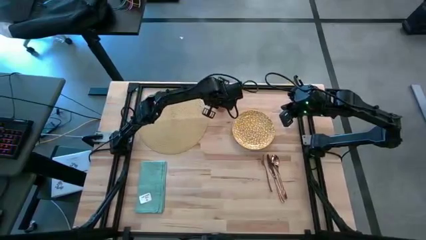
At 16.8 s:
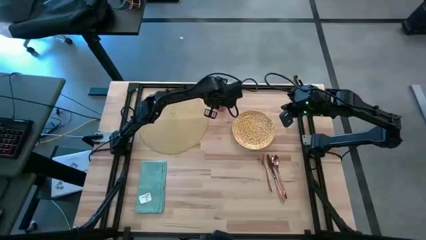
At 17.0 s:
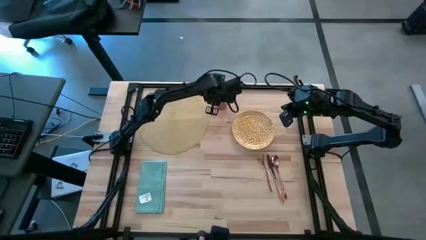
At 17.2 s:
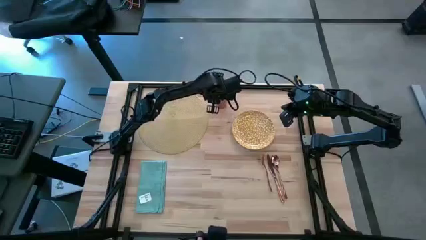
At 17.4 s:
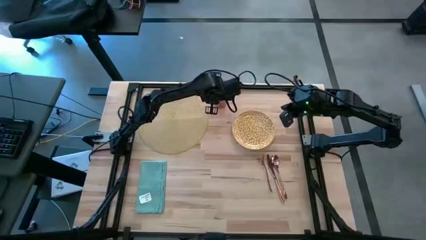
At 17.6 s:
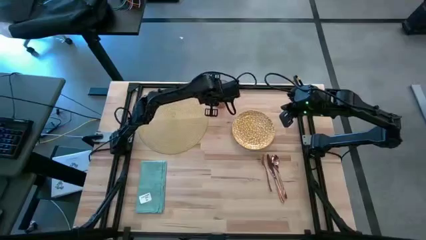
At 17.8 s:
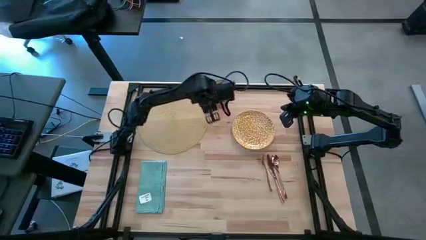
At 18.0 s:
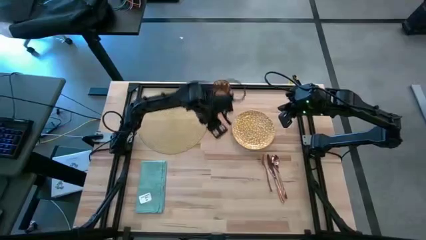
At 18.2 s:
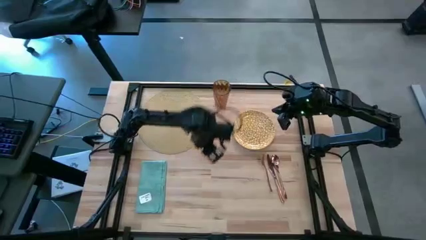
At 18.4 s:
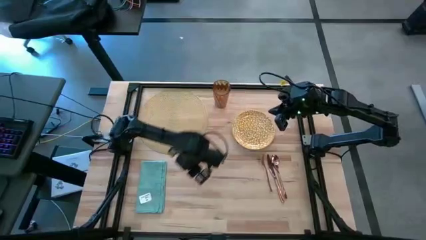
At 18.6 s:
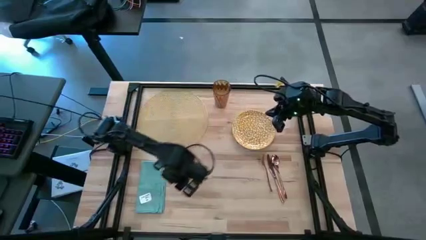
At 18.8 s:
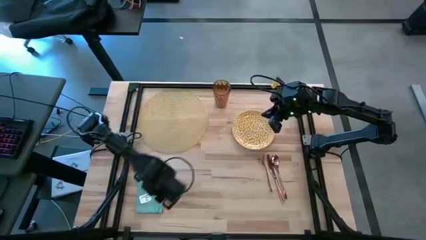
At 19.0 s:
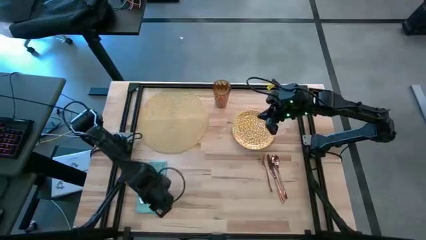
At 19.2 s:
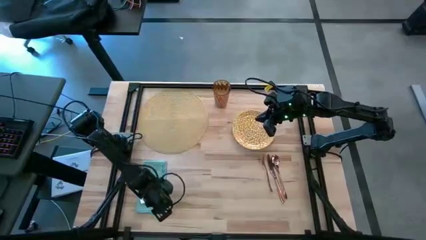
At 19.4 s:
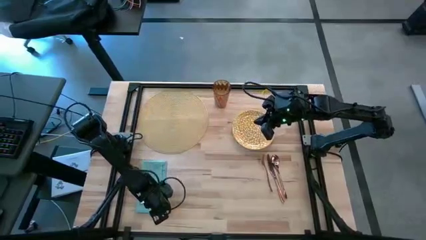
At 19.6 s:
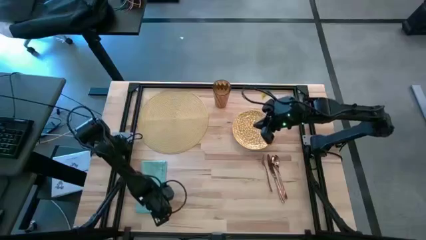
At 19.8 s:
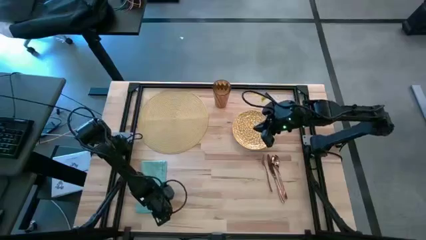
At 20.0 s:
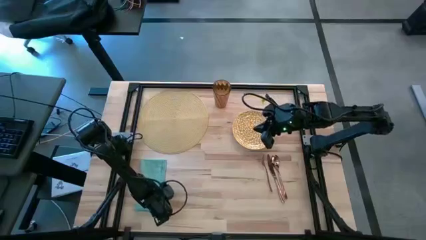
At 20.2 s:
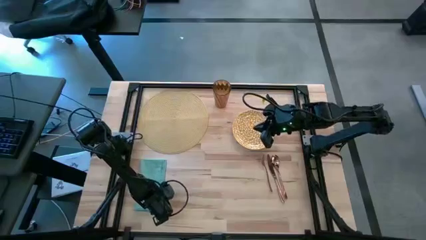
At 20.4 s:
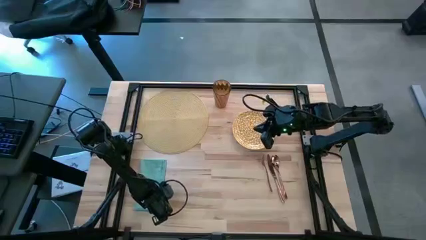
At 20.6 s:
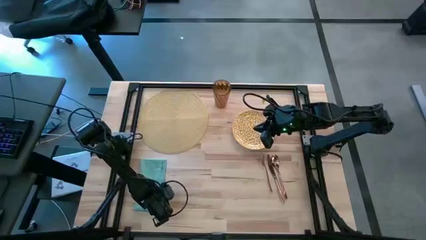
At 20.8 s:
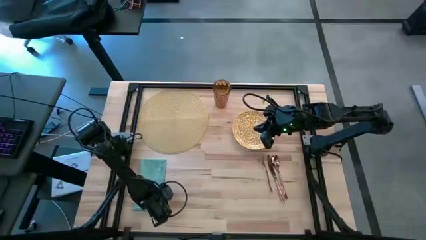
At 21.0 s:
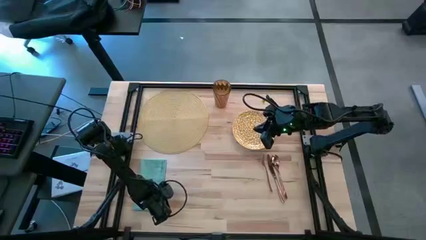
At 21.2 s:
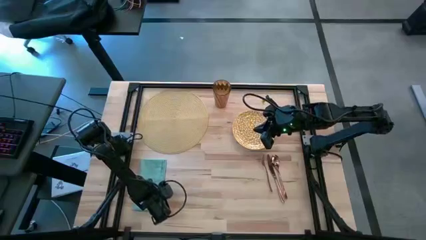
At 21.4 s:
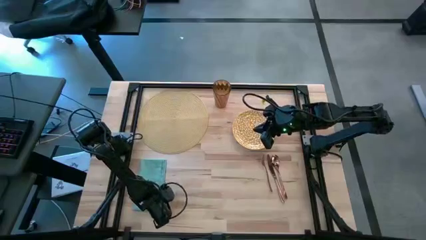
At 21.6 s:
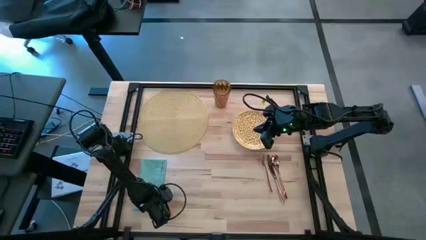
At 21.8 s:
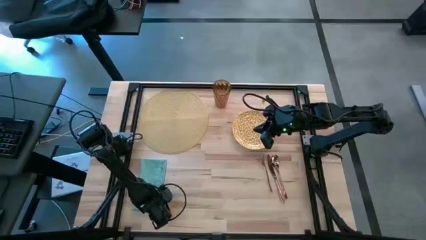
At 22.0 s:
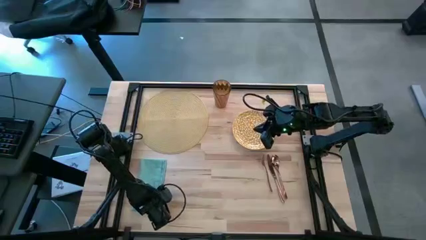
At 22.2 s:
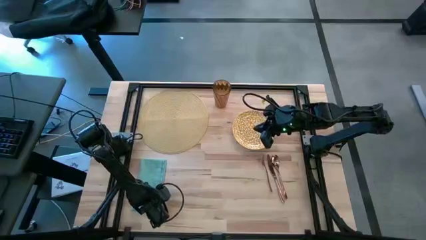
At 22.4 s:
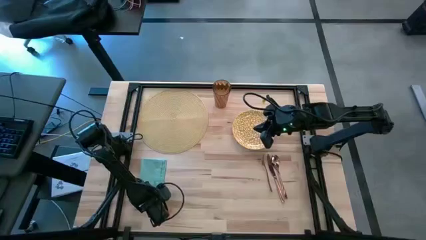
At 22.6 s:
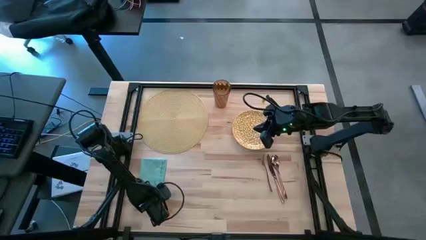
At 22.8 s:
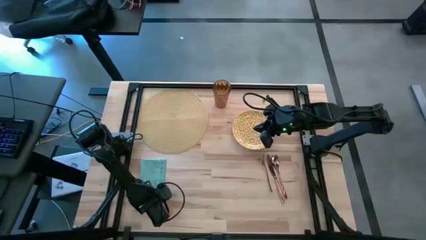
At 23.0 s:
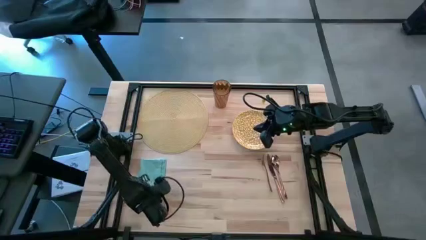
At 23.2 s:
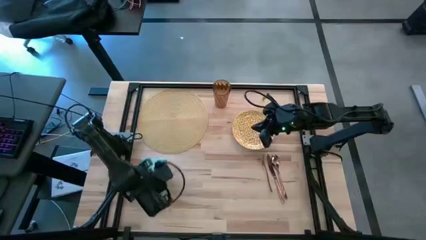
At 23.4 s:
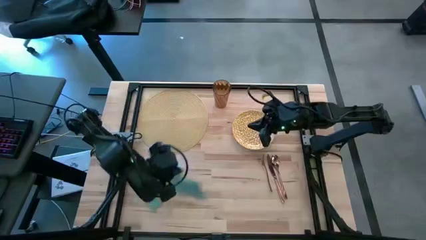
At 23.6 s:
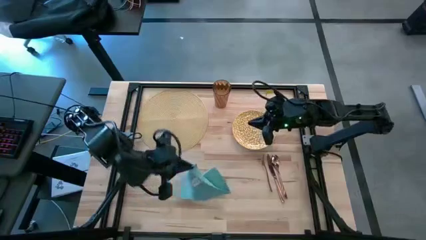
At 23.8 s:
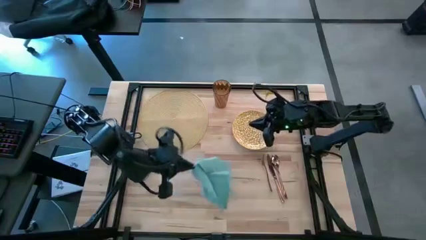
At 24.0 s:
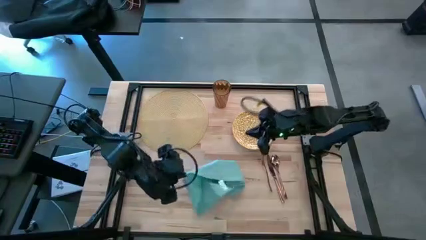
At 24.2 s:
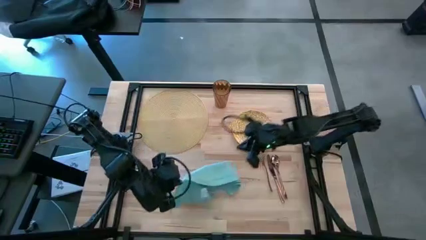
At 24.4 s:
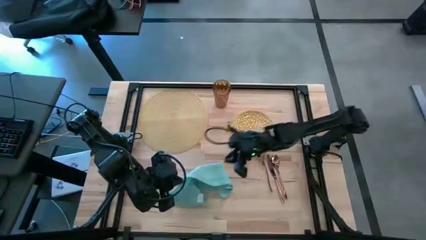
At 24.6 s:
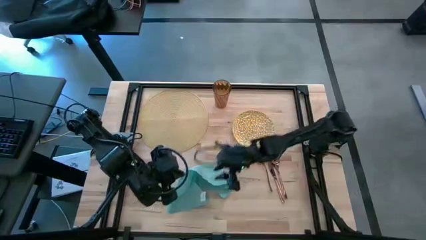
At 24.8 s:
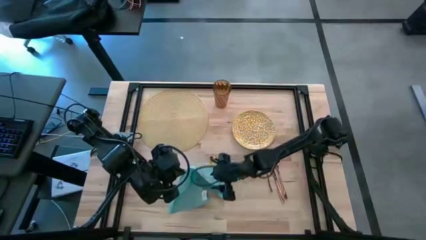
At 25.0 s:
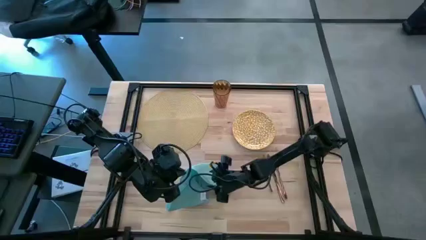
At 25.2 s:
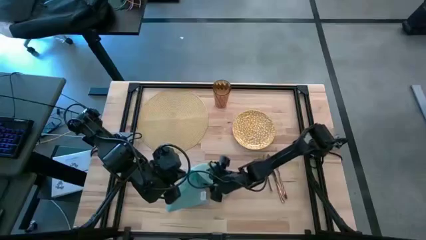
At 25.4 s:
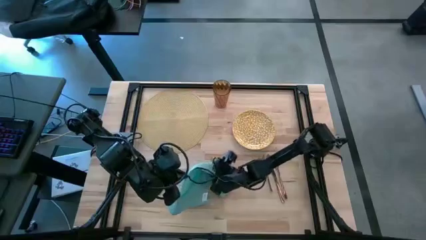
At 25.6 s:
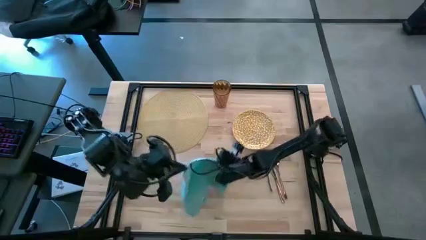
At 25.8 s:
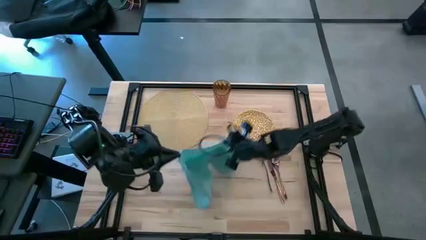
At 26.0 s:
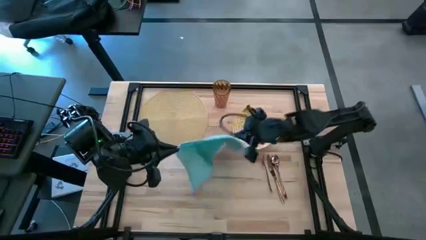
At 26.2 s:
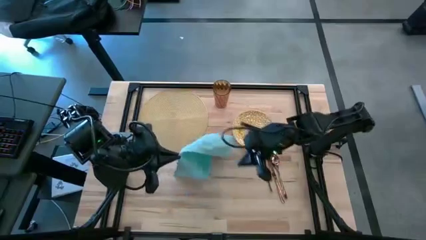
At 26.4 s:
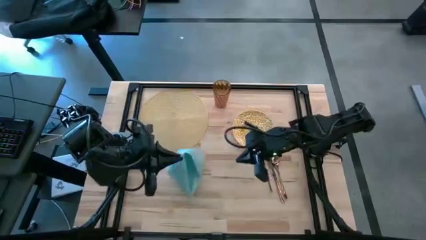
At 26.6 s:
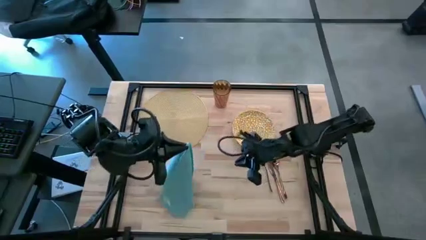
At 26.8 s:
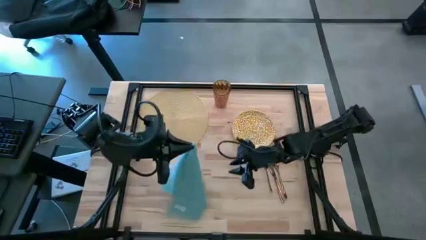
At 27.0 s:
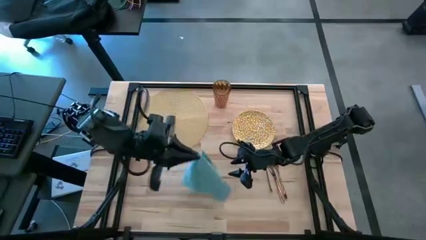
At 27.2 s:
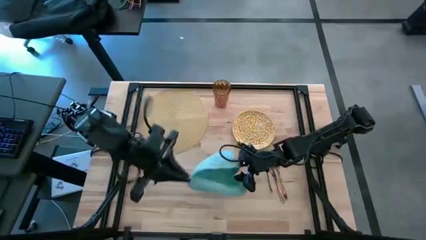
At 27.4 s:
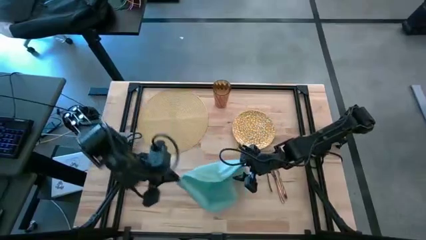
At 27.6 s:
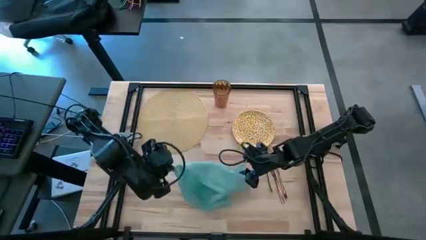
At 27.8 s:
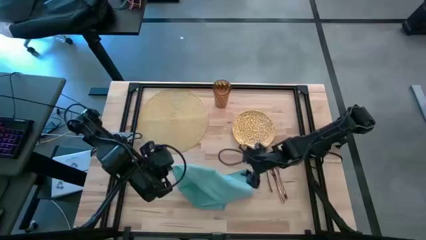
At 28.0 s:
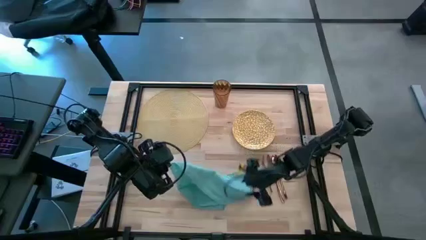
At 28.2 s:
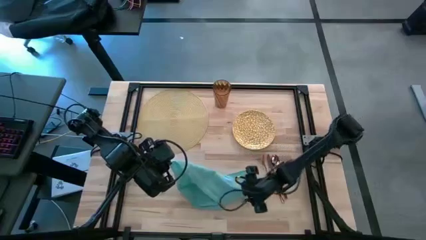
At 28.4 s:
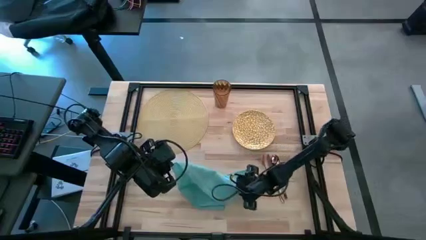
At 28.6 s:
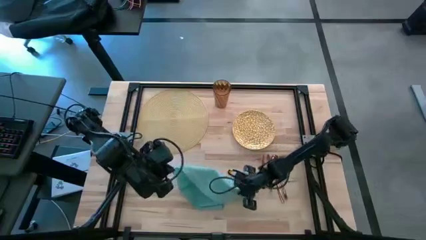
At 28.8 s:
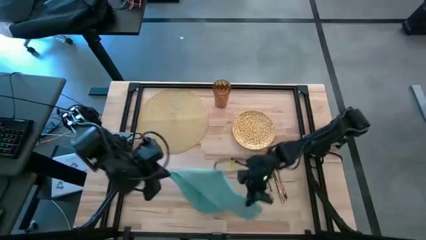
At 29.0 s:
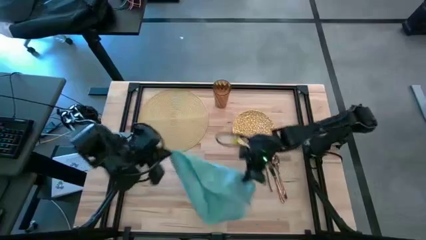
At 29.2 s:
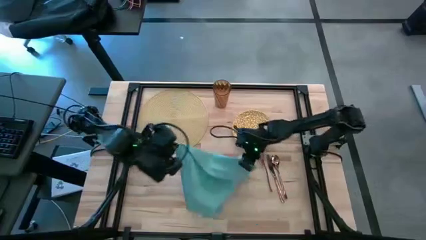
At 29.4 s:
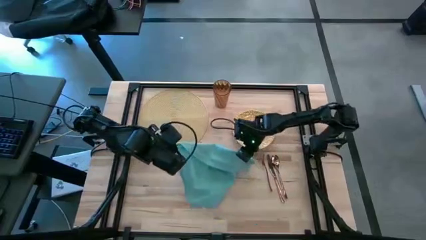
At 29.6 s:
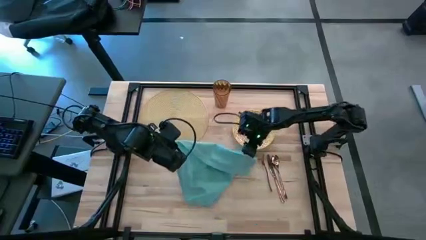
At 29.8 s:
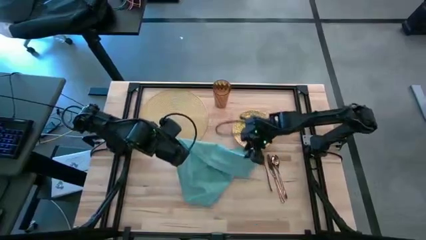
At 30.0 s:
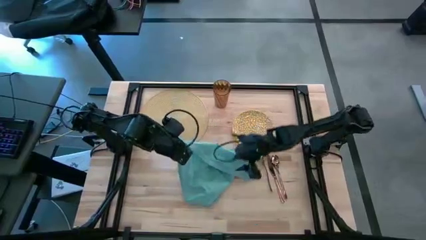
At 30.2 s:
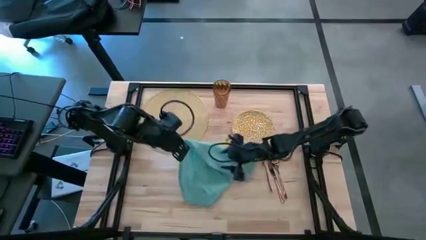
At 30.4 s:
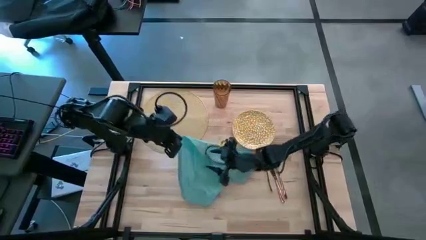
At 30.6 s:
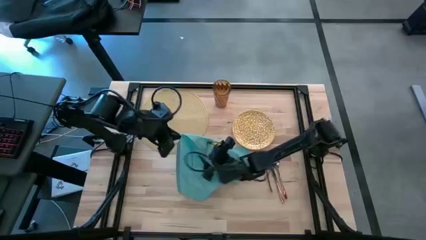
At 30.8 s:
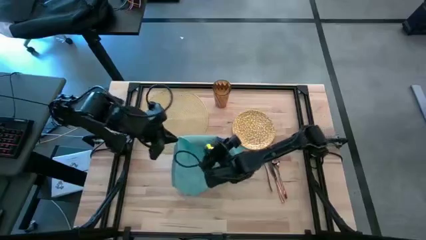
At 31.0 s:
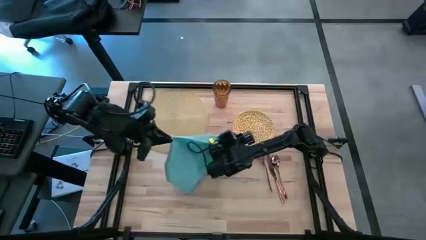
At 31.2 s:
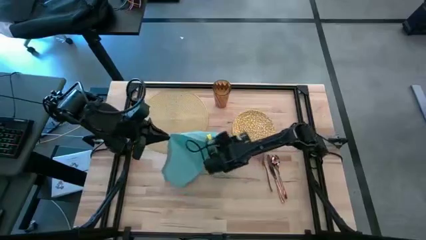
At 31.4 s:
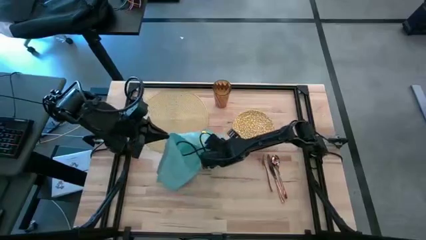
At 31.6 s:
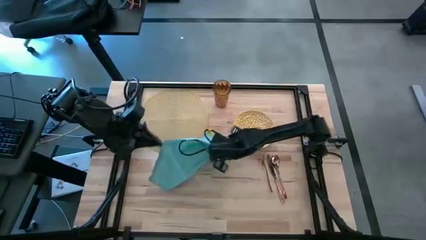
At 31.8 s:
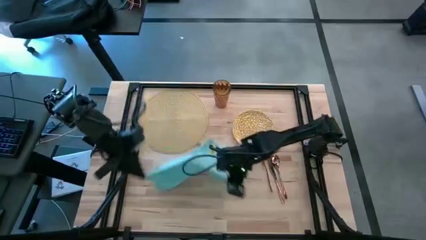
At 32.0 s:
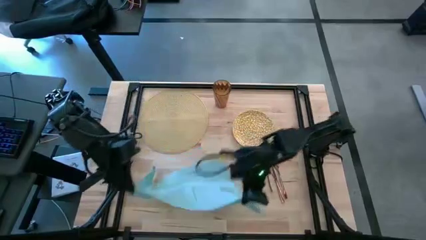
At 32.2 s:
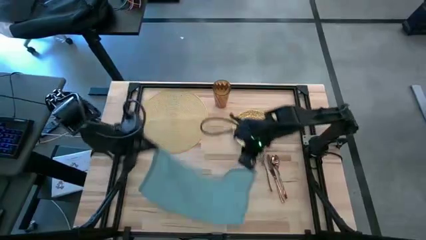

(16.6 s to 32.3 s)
Task: Set table place
Fold the blue table napkin
